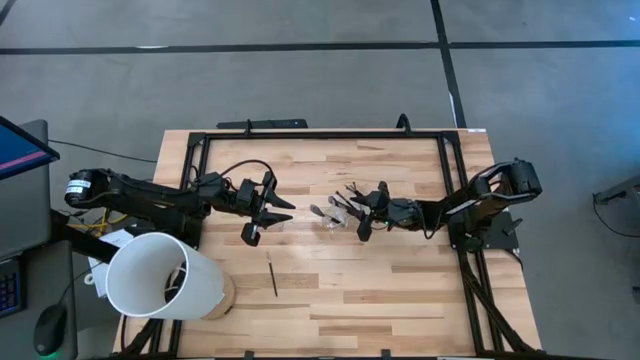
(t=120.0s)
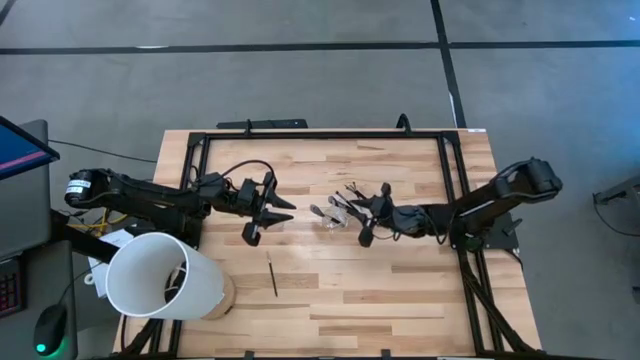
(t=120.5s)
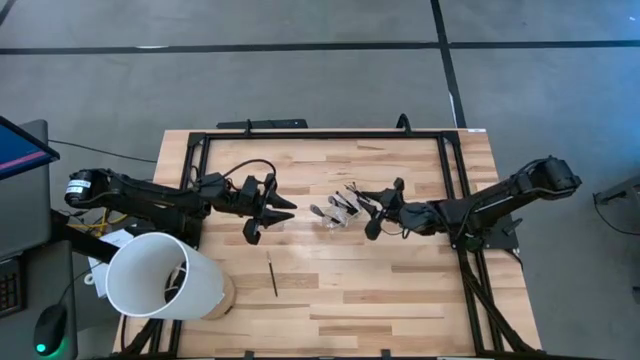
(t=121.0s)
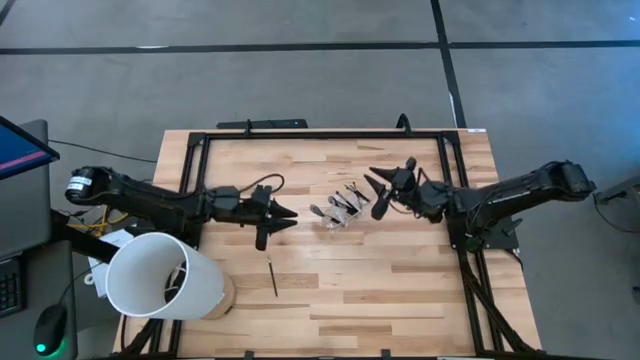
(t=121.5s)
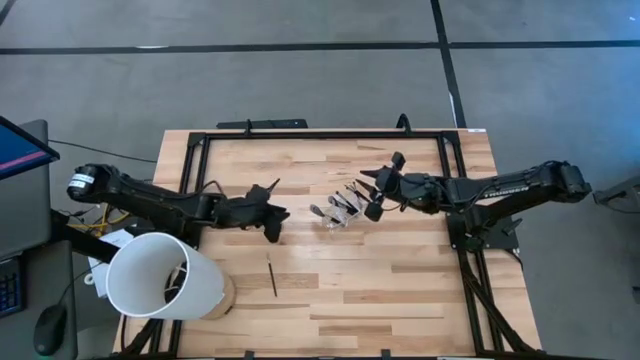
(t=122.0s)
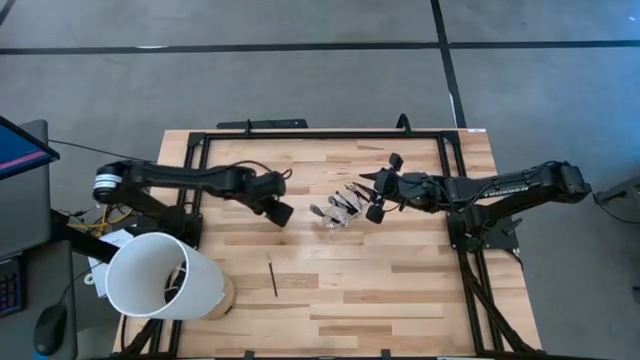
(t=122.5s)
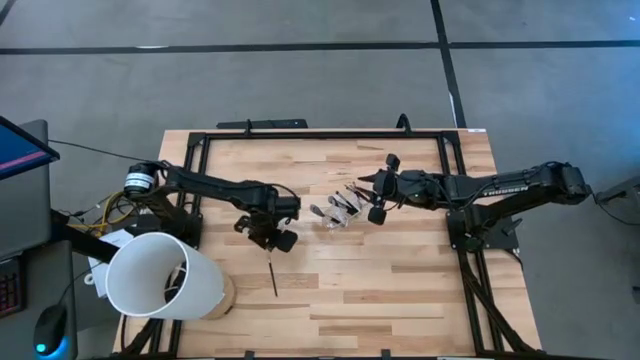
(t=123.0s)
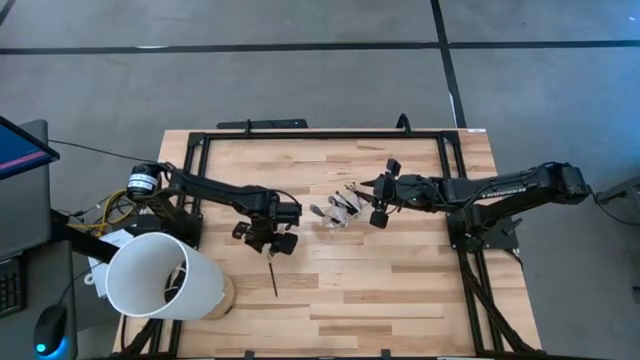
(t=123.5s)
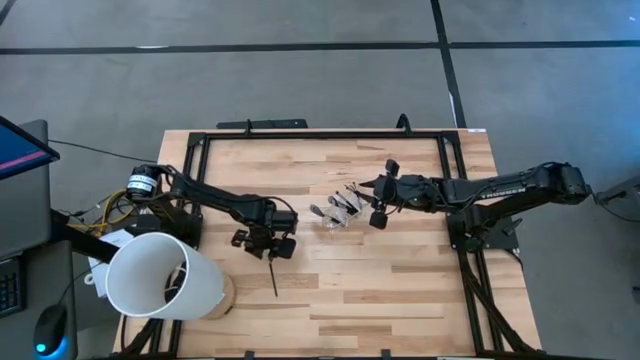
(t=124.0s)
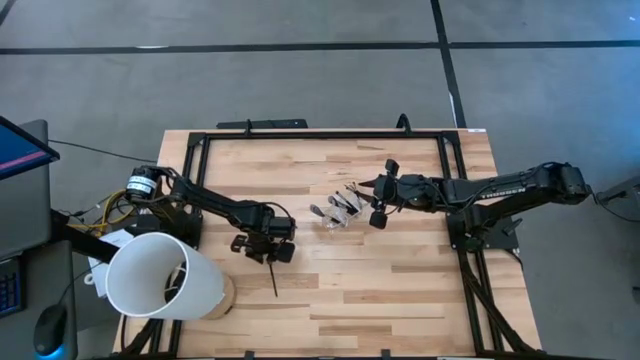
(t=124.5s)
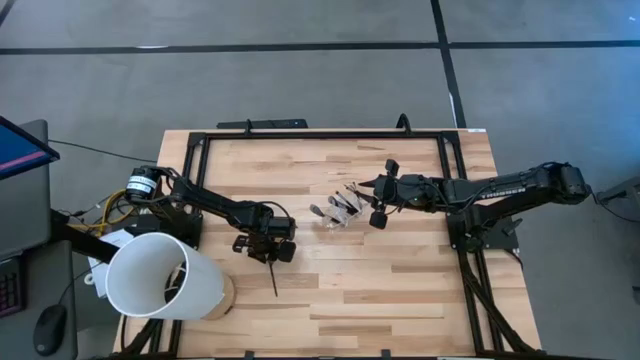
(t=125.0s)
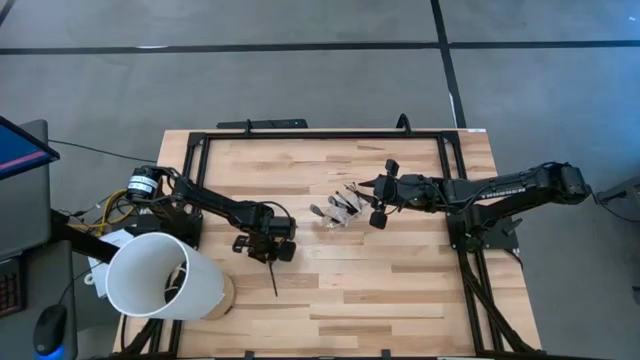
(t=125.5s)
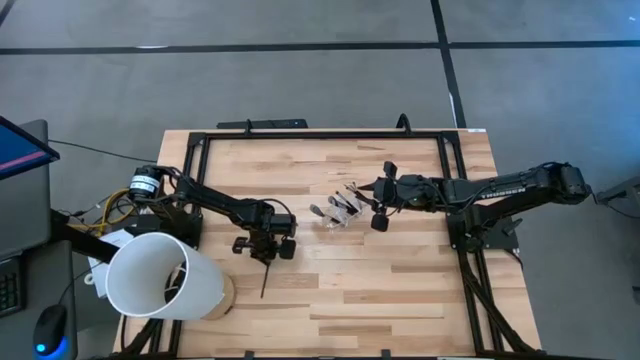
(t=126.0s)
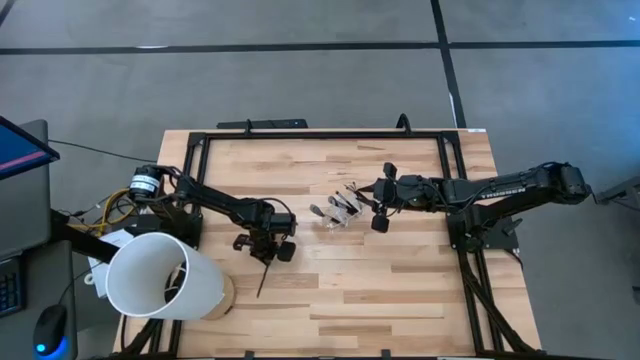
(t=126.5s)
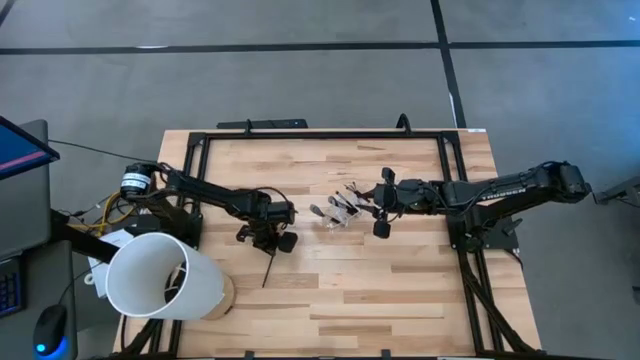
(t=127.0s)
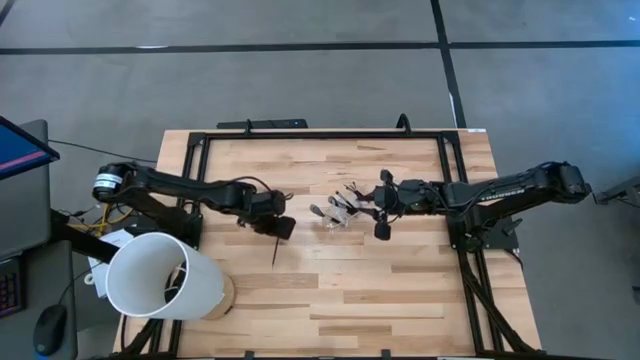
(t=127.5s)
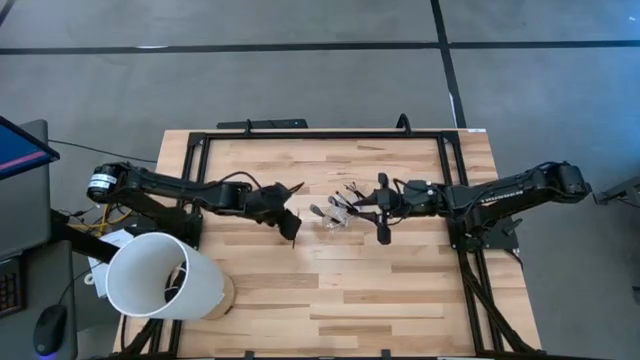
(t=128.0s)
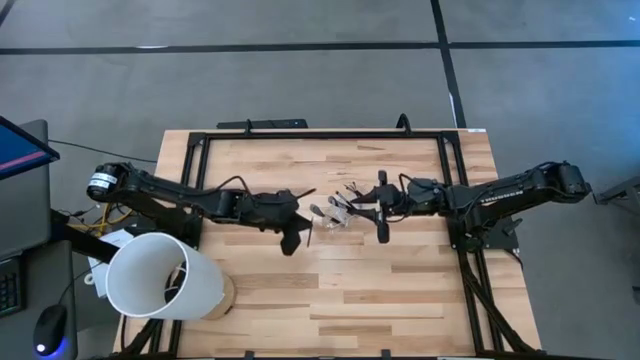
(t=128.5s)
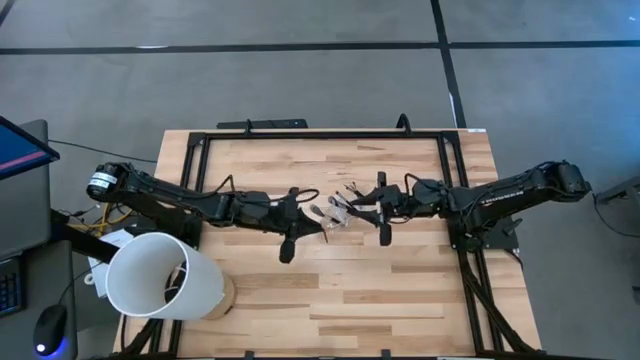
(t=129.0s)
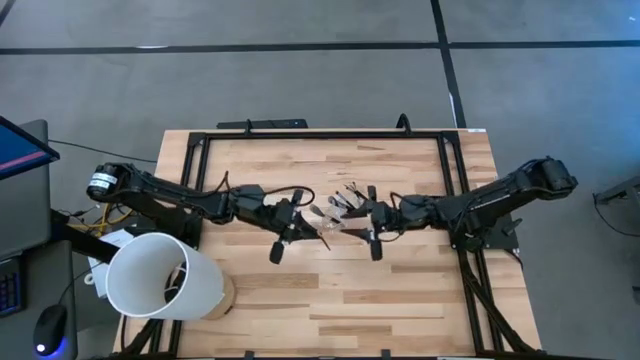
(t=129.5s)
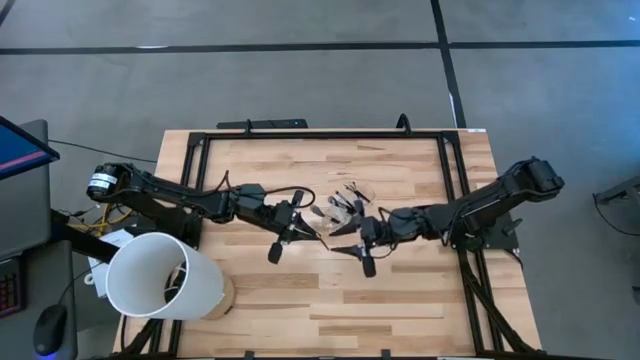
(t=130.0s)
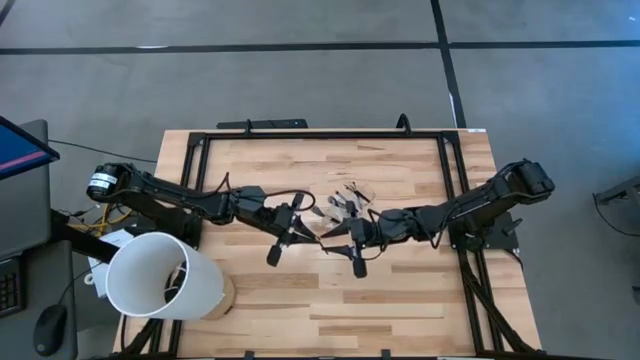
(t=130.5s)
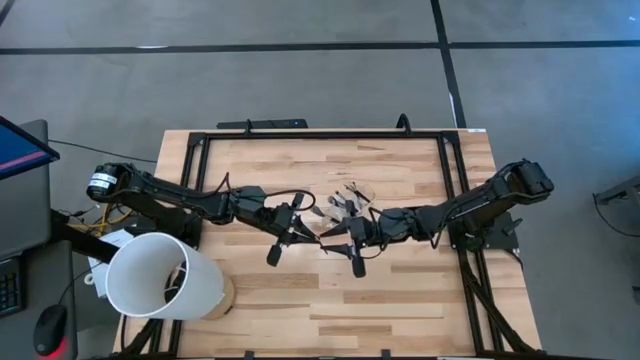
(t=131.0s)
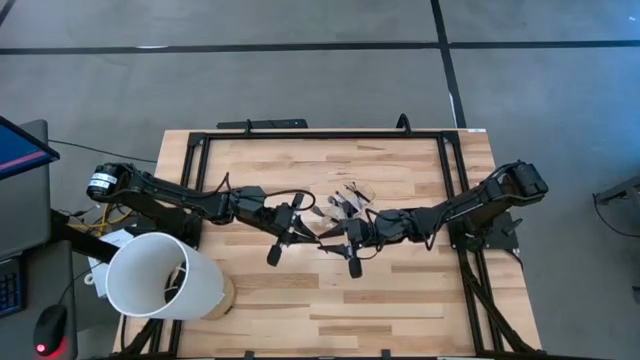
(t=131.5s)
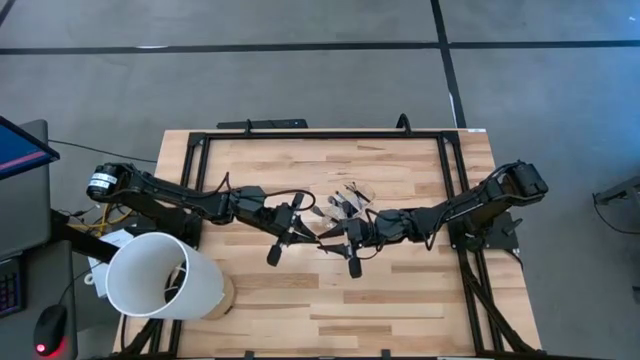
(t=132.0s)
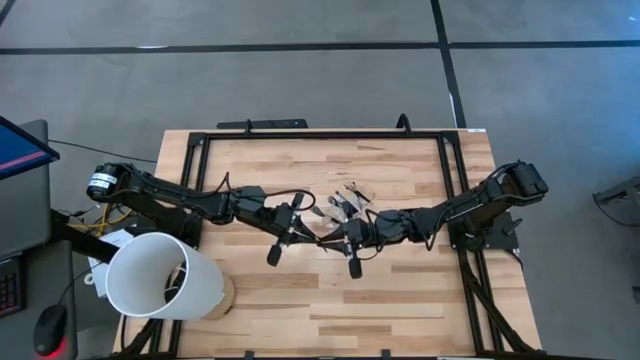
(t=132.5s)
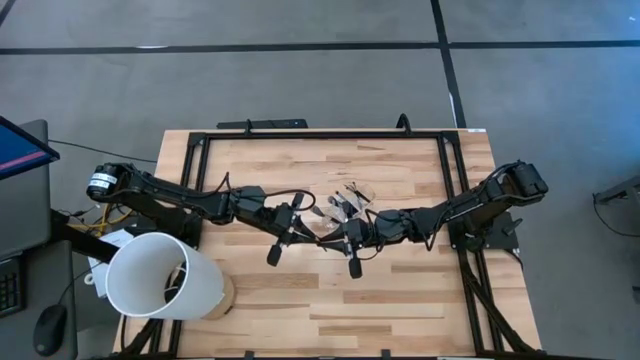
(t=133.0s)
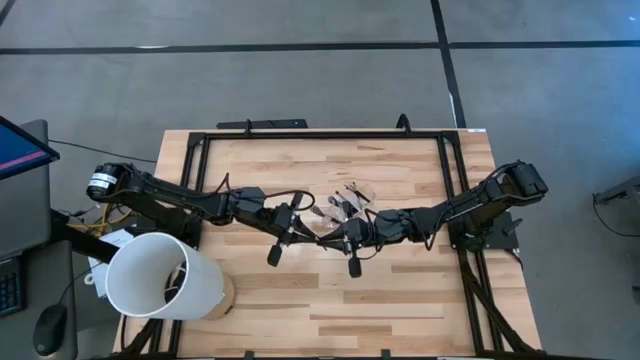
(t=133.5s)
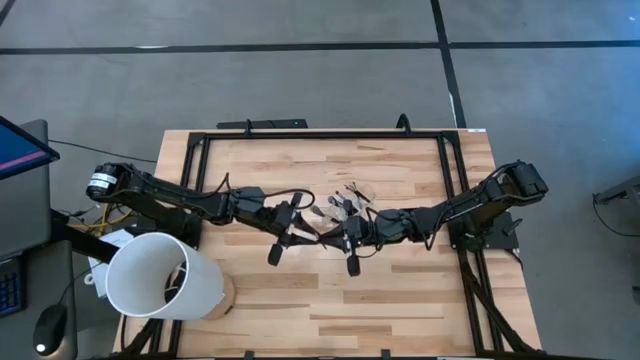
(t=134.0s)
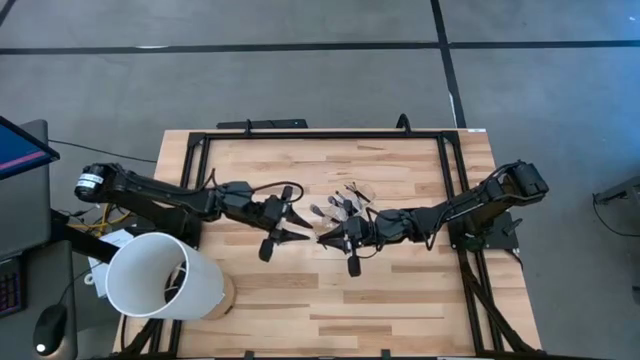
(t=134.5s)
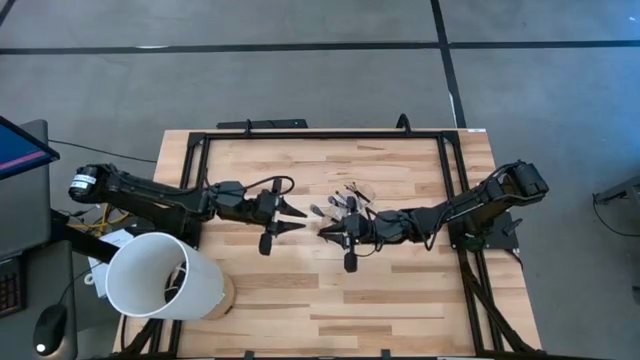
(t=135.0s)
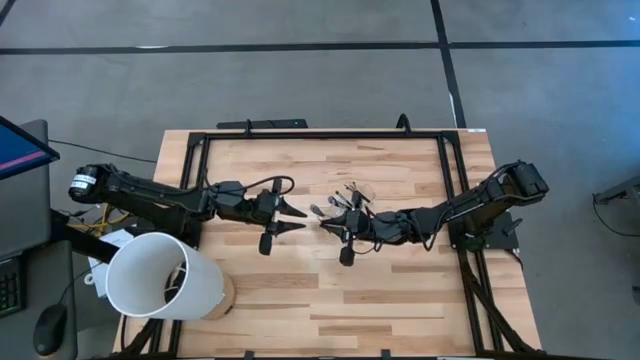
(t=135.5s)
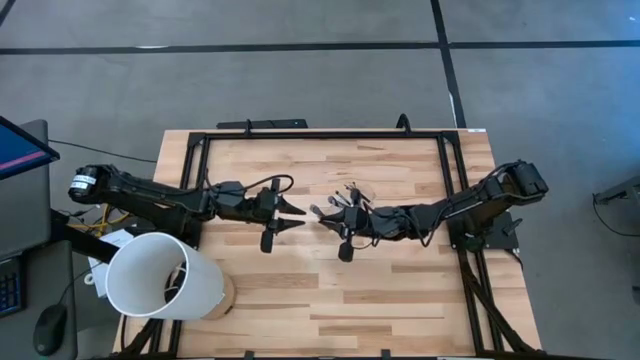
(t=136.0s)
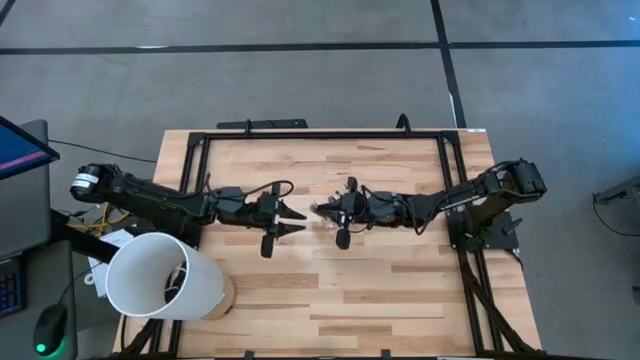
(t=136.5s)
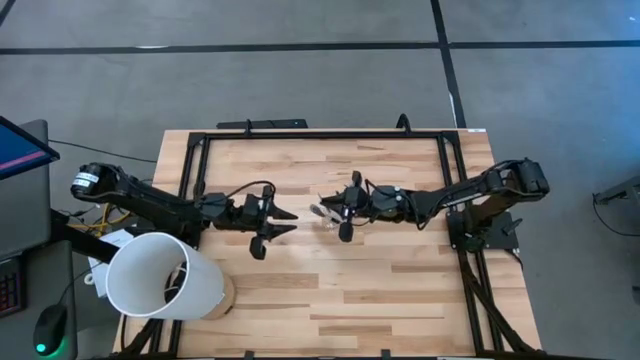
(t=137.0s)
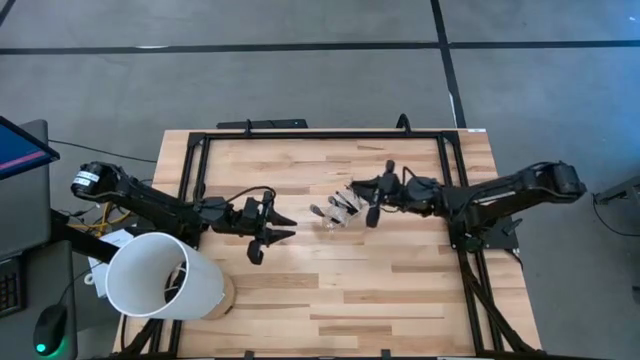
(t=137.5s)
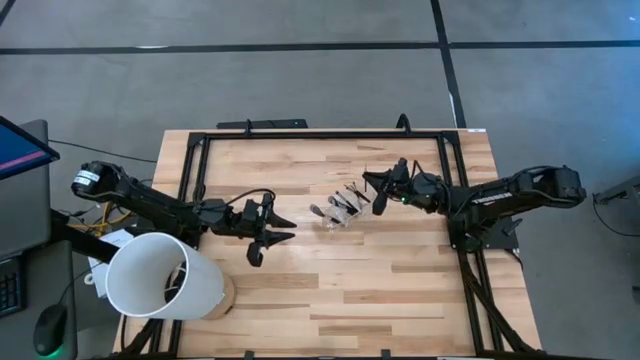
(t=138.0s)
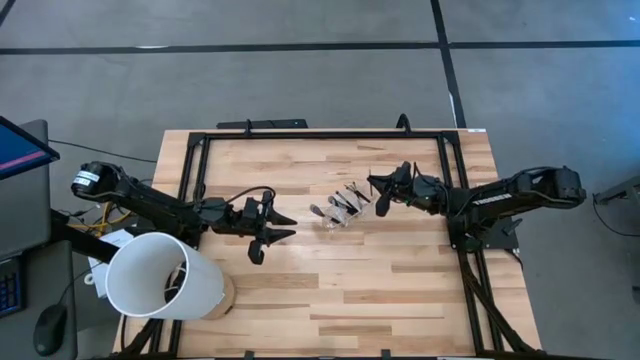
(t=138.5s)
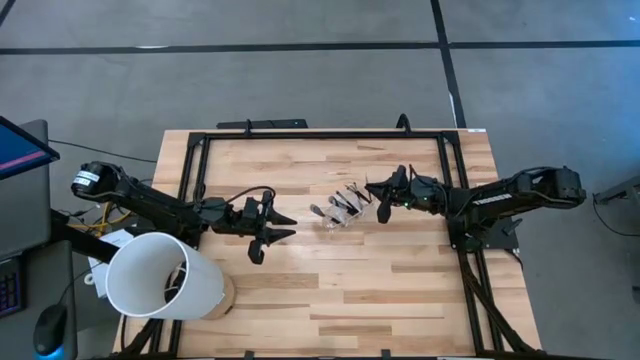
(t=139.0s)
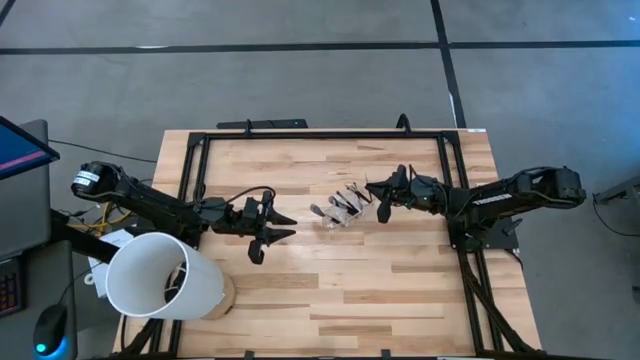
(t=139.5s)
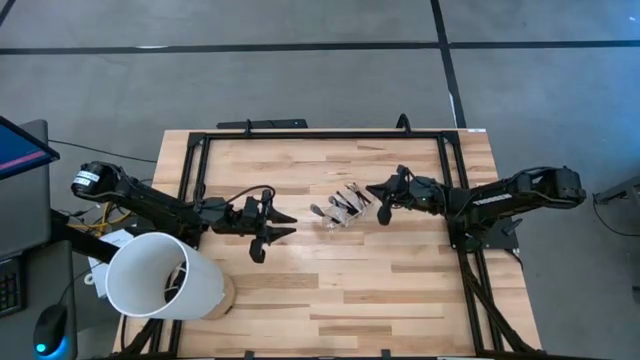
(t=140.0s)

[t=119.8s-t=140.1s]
Task: Put items in baskets/containers
Put the black liner brush into the transparent organizer

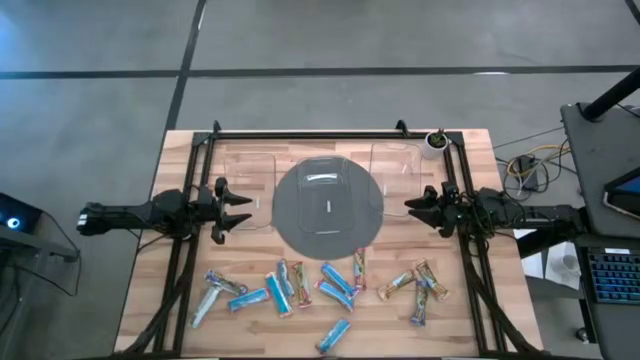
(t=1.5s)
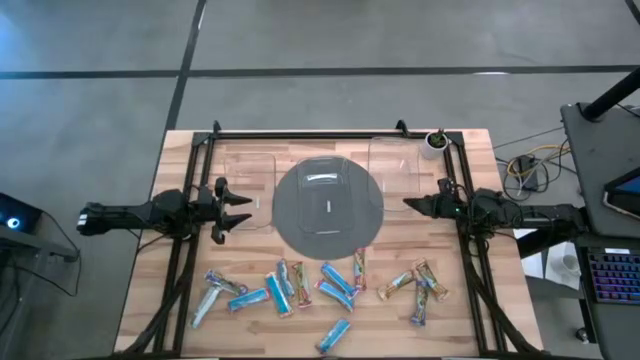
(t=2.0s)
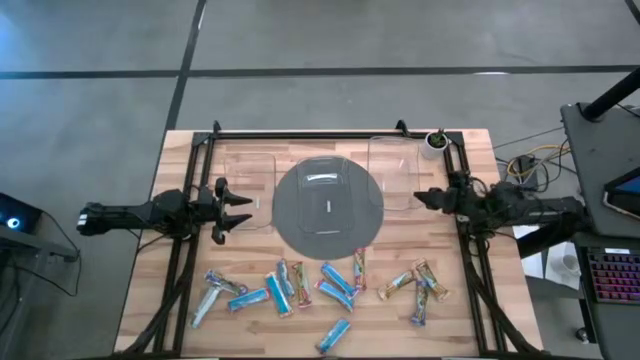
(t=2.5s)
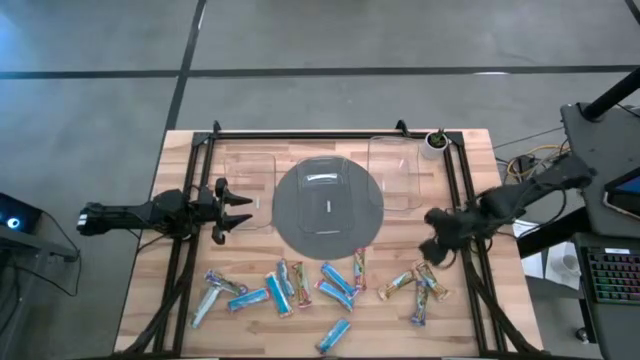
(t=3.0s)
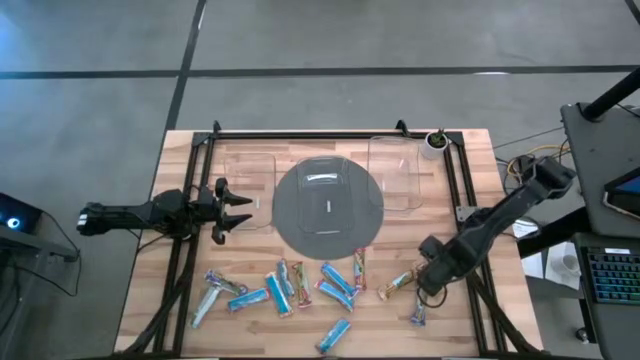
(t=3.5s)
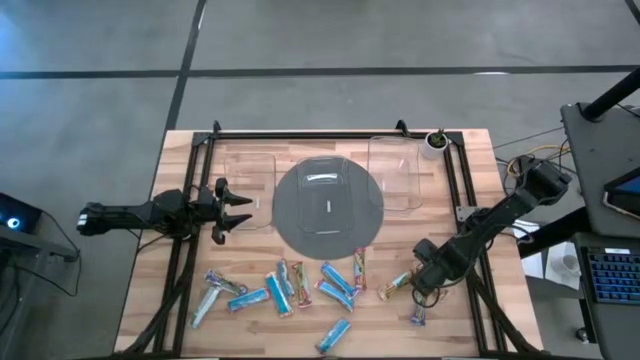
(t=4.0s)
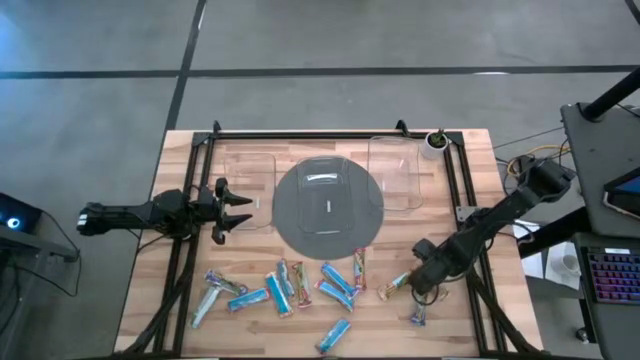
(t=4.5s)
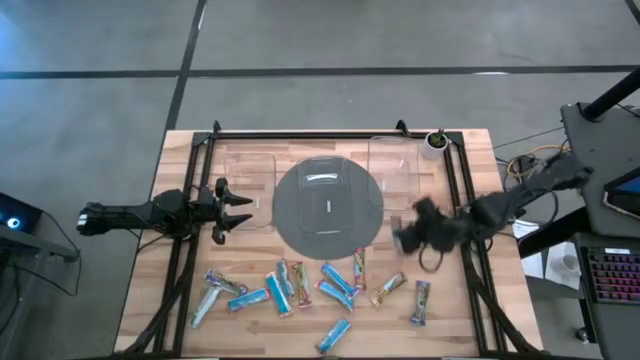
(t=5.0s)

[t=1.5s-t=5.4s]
Task: Pick and place Granola Bars by type
Put the yellow granola bar into the right transparent bin
